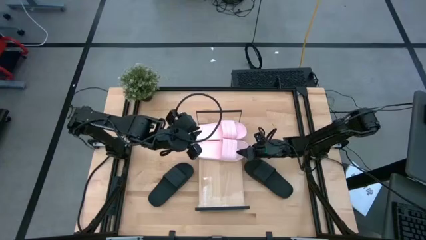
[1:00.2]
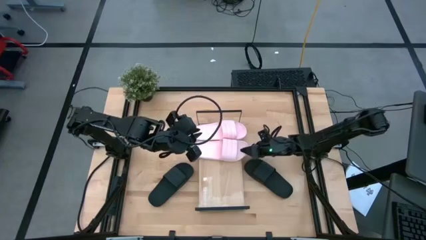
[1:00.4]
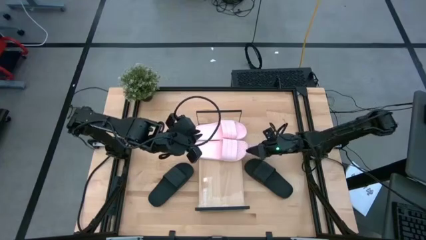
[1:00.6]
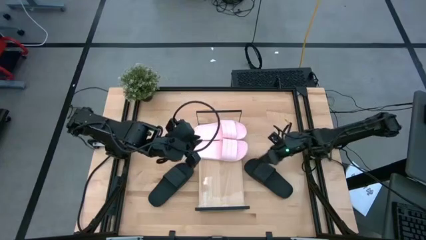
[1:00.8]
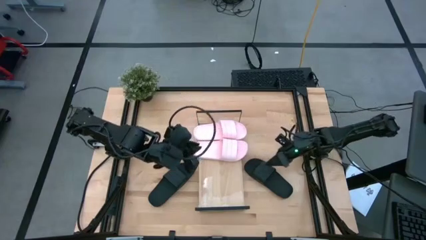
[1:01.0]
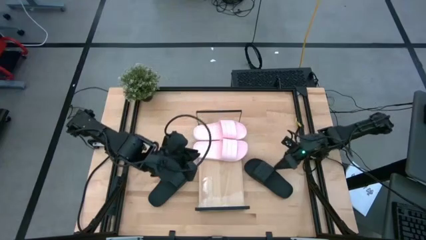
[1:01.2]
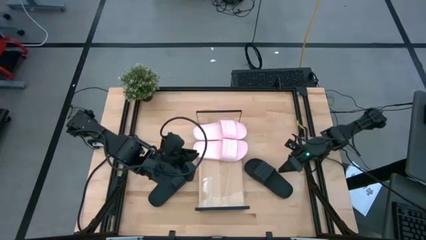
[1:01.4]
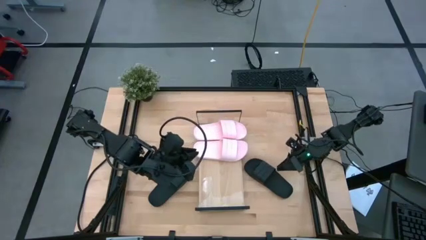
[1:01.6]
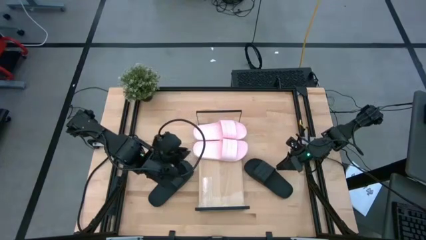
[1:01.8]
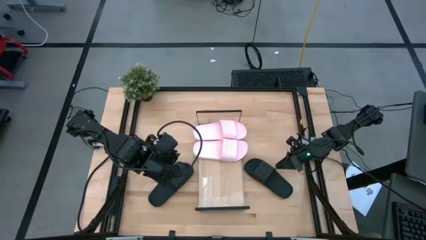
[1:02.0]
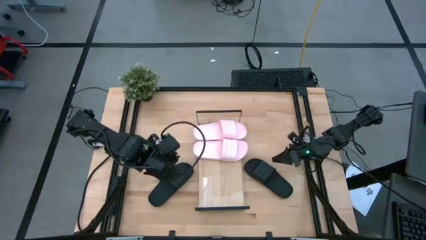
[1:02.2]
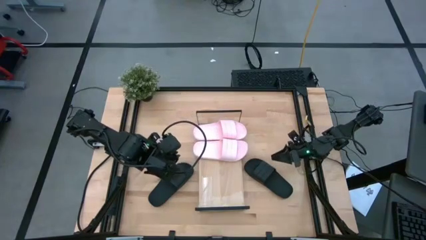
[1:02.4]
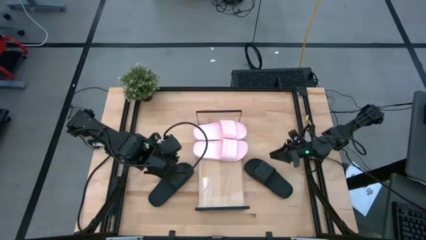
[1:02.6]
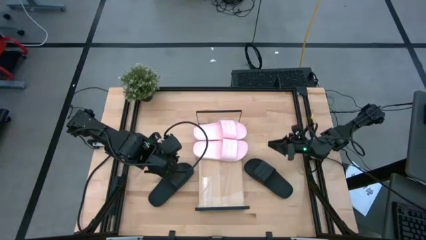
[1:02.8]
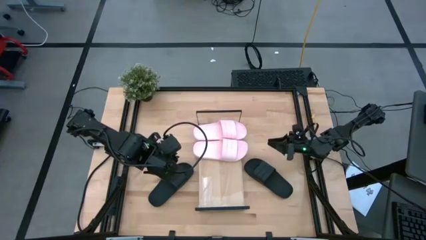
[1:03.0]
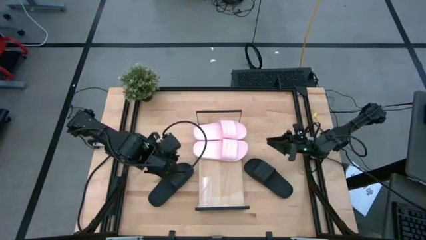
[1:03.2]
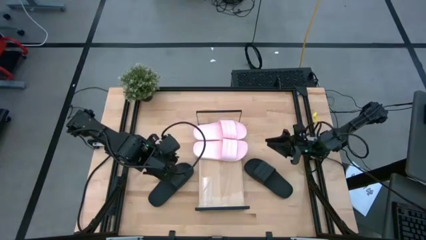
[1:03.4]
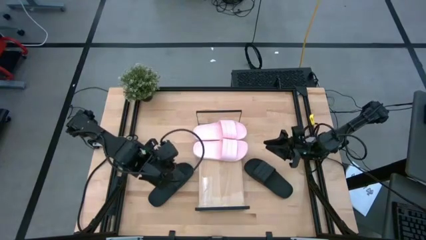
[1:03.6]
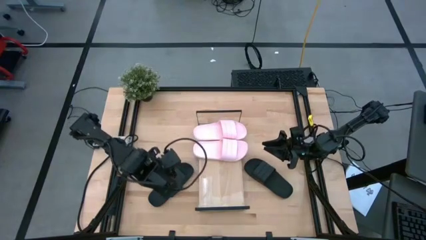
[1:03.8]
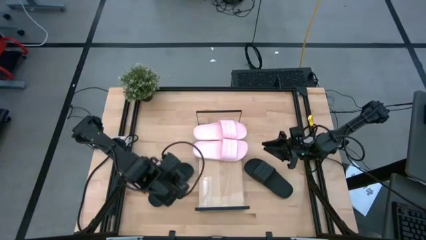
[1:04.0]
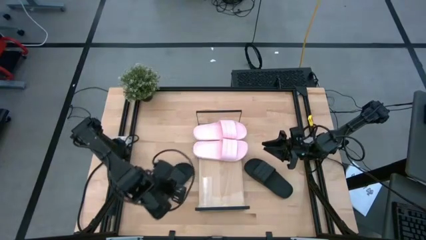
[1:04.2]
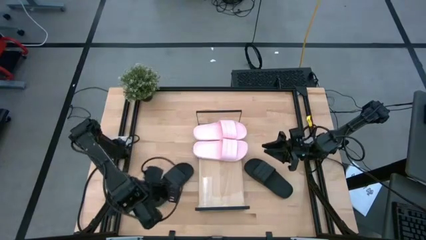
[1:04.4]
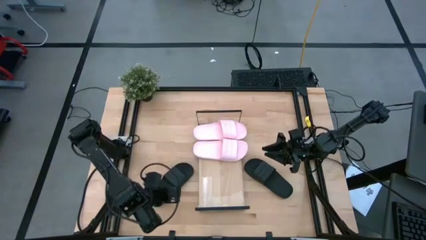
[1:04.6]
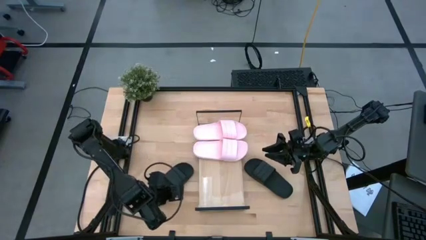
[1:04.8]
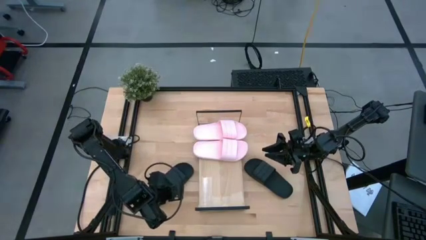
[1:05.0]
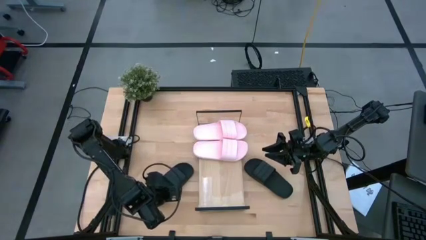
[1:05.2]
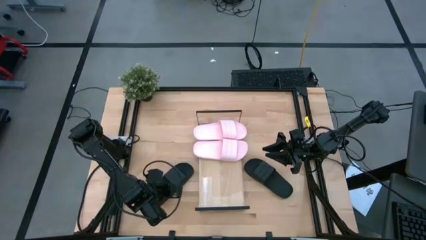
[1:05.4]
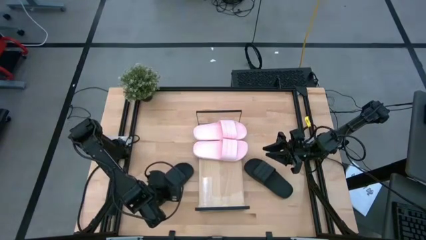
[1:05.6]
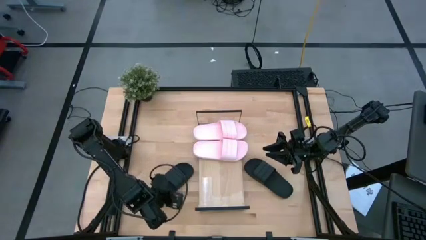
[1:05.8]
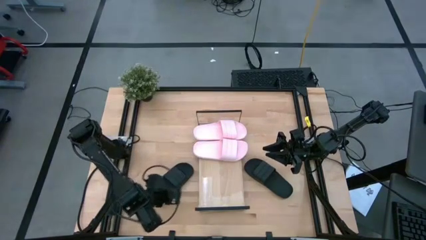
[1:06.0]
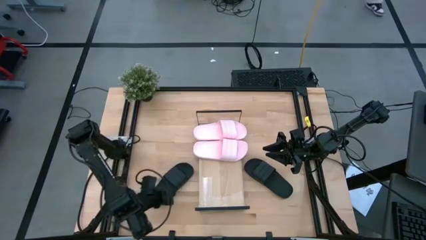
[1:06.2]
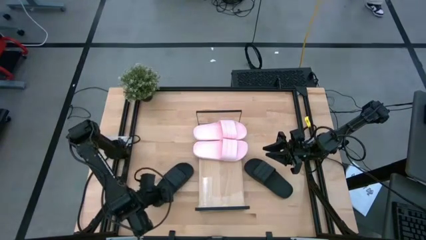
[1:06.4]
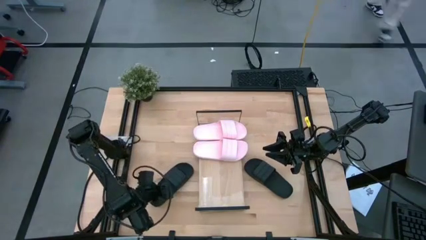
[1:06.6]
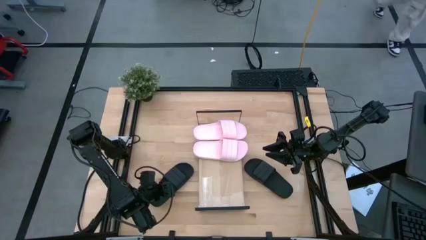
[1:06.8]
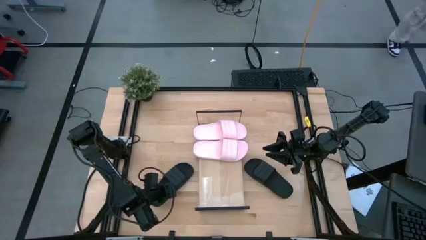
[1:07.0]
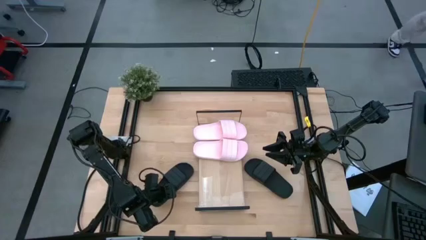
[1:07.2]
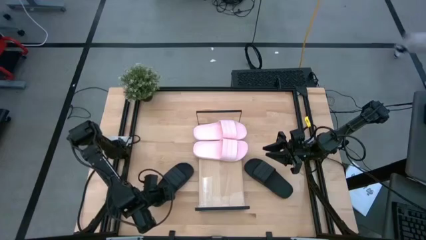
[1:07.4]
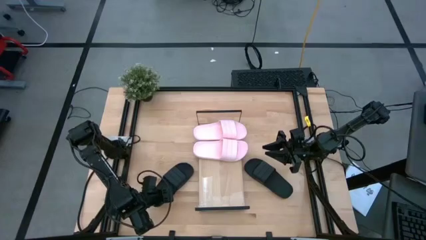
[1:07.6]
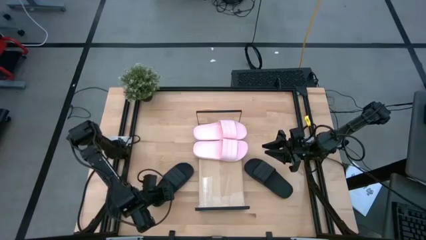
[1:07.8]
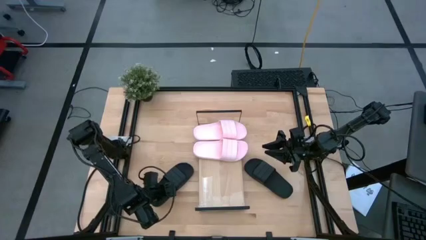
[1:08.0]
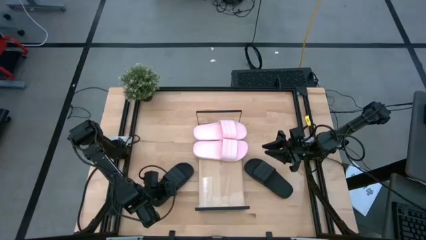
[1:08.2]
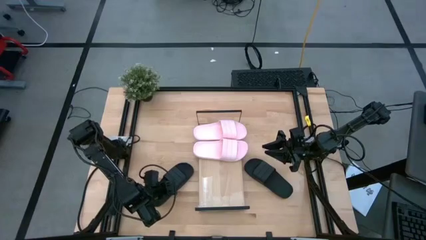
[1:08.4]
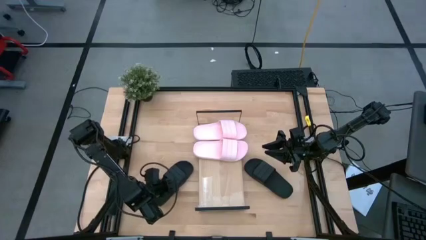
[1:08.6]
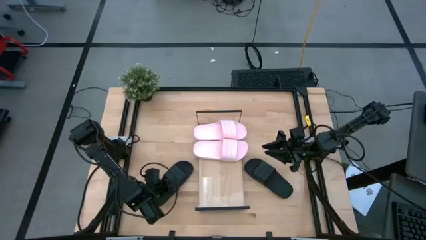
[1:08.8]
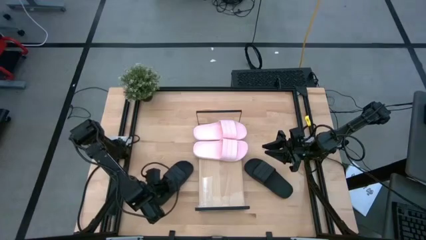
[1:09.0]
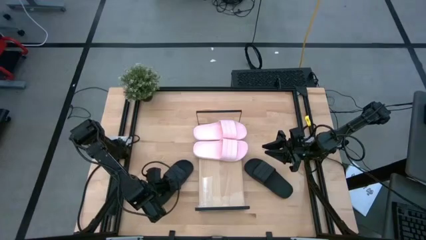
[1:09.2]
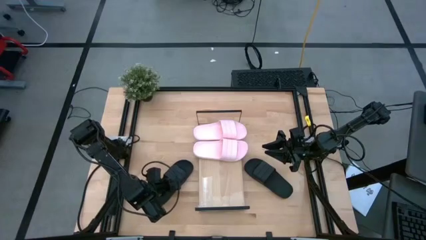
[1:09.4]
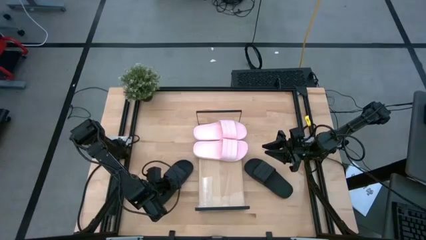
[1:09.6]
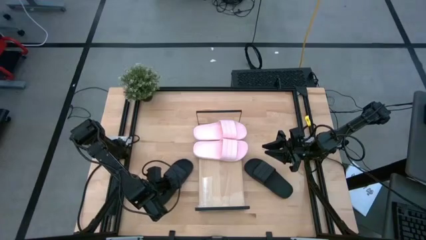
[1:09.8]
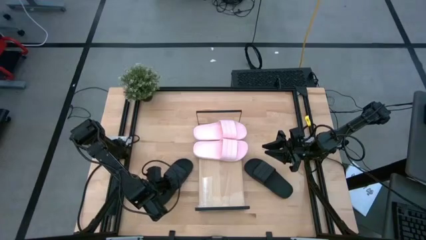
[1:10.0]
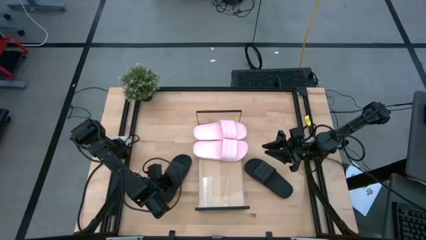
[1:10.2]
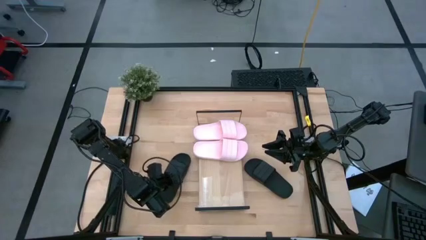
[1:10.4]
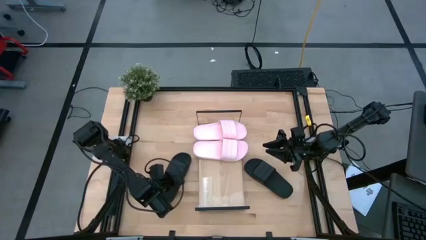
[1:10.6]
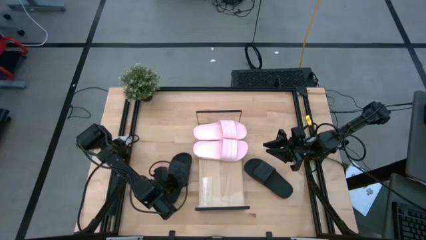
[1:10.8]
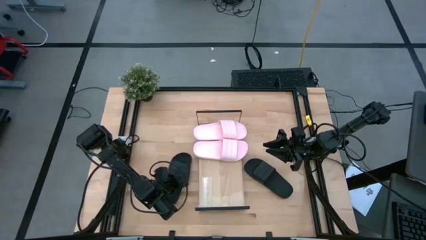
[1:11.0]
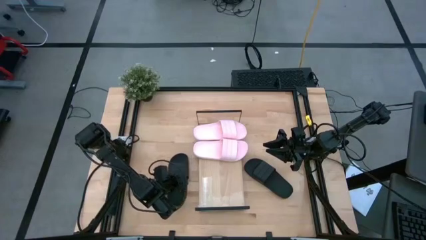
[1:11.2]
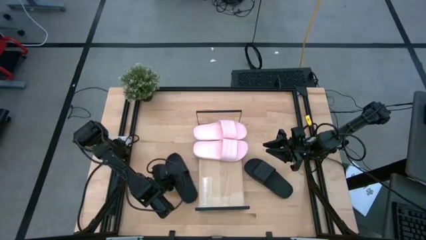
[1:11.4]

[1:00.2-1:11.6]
Task: Pick and place slides into the shelf
Put the left black slide on the shelf

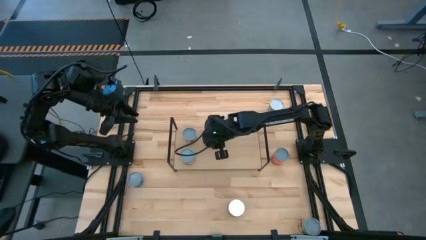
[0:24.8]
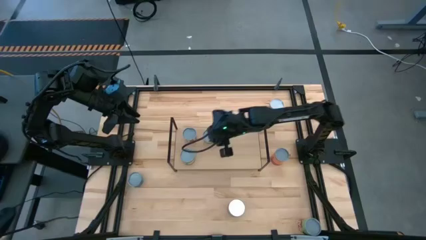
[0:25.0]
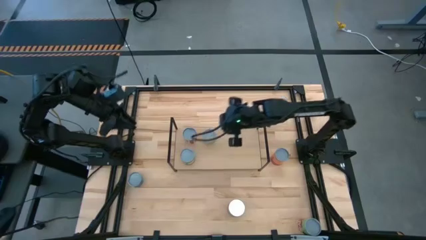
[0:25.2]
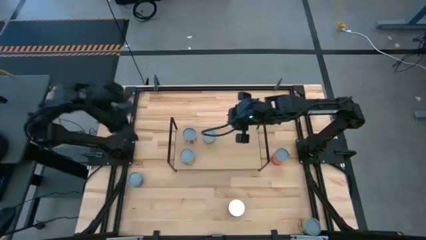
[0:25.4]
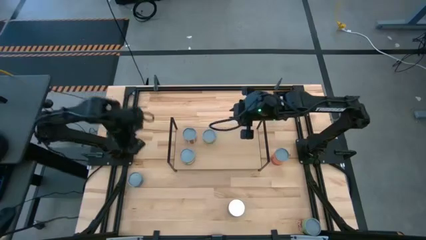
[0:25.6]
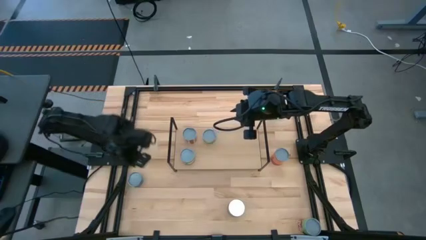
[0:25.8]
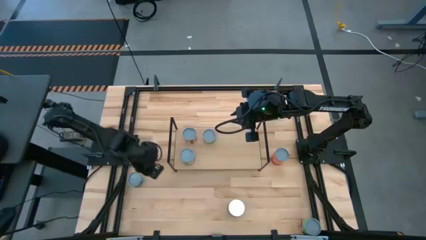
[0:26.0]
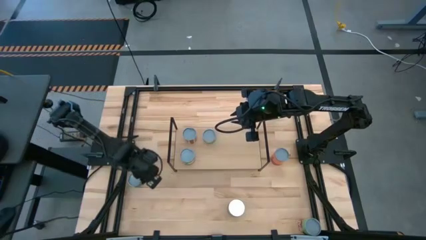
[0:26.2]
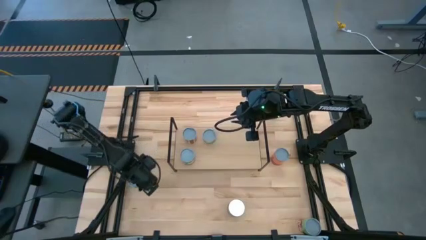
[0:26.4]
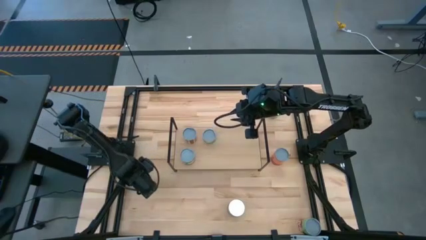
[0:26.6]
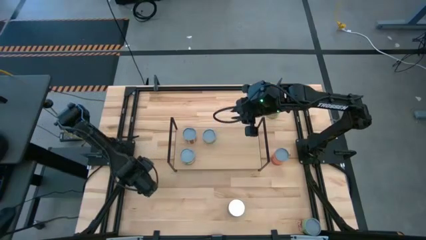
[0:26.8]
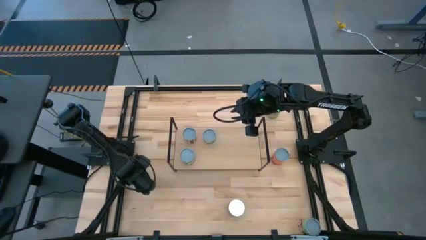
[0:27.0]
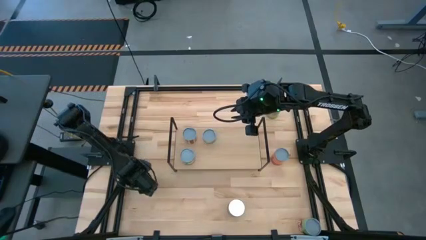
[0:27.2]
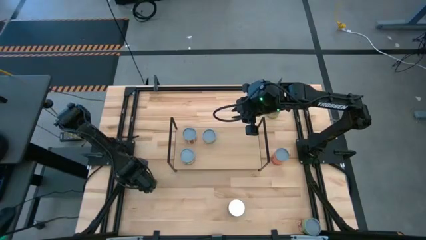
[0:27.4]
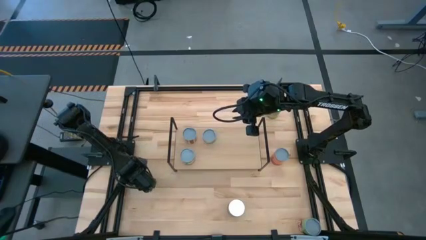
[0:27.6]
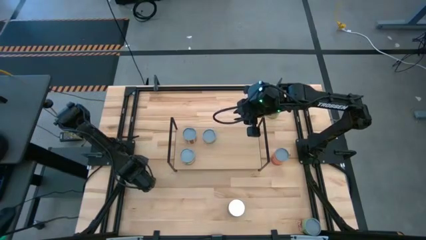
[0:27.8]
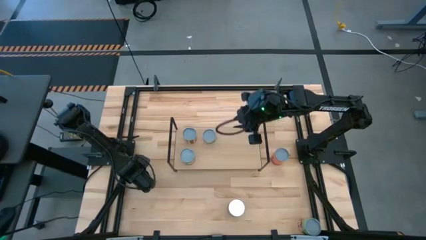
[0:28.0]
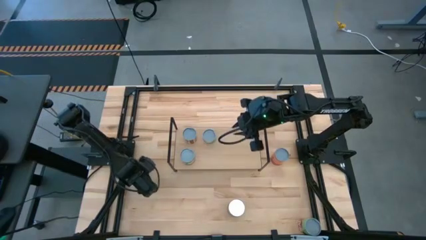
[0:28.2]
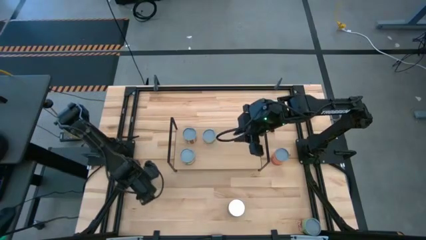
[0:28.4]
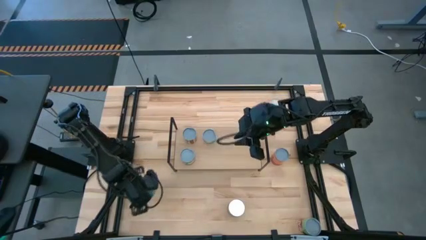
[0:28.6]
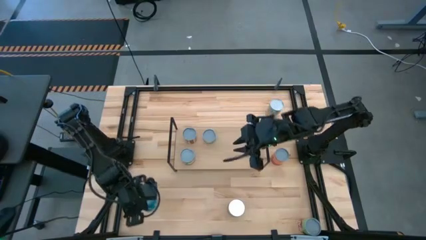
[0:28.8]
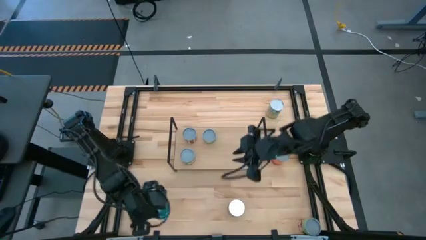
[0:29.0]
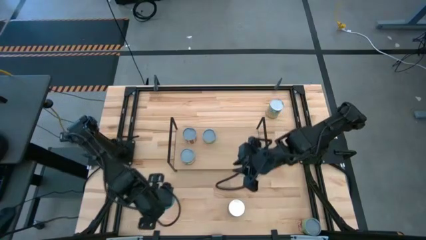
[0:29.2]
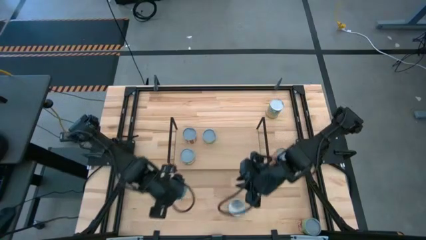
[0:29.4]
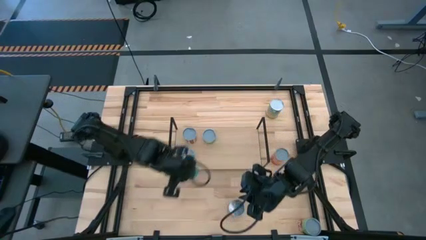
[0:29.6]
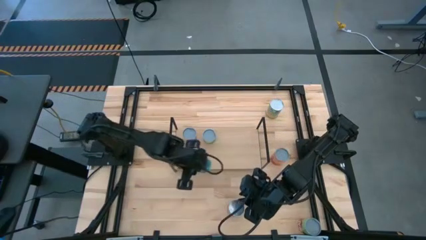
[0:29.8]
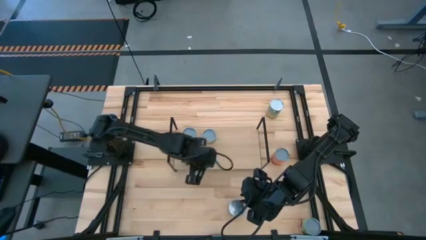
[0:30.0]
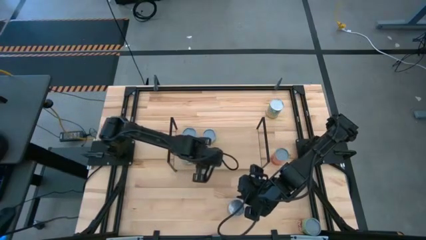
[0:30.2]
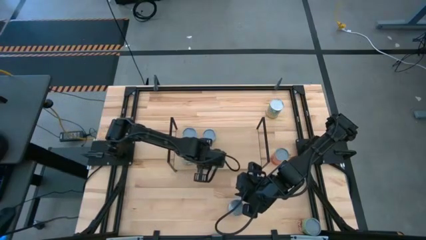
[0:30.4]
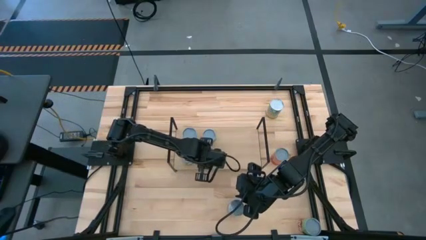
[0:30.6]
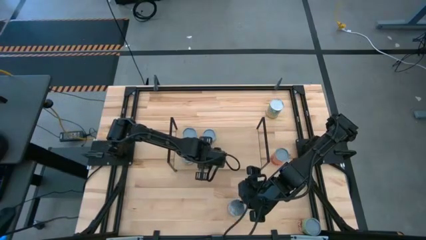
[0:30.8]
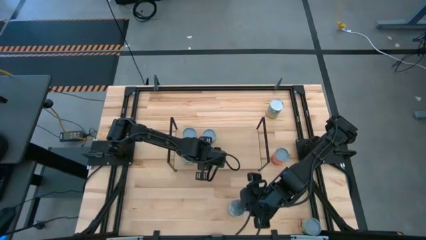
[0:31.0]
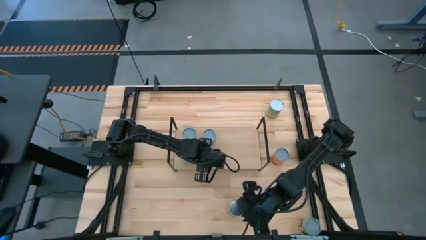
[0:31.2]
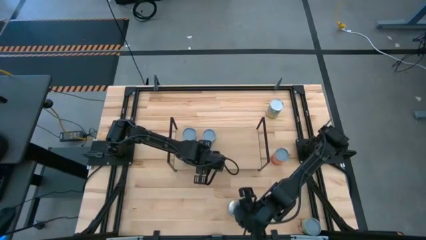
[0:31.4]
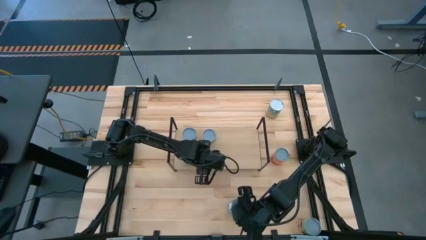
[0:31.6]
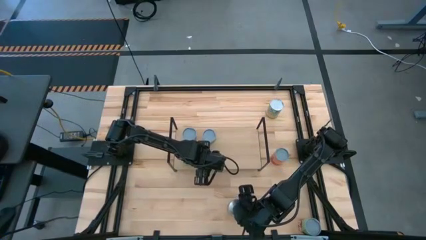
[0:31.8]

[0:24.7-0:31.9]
Task: Pick and place cans onto a shelf
Put the canned tuna fish on the shelf
